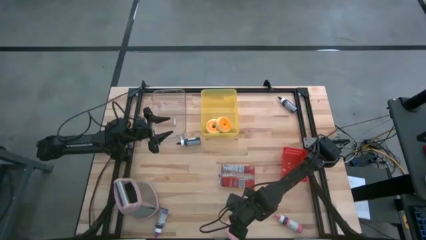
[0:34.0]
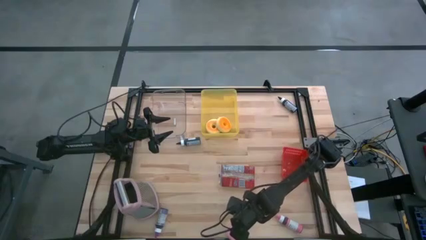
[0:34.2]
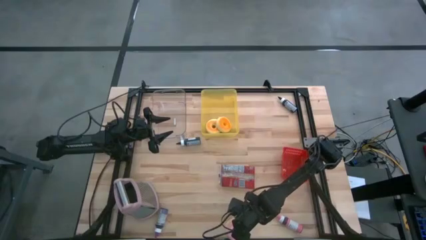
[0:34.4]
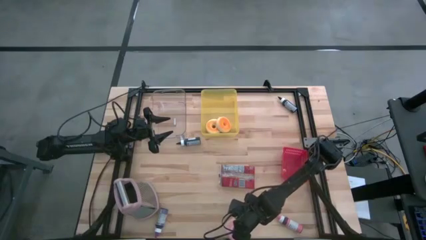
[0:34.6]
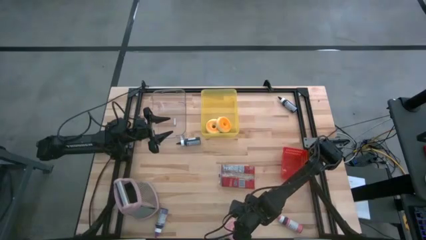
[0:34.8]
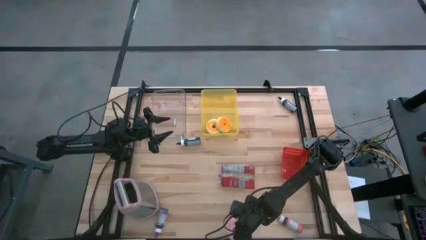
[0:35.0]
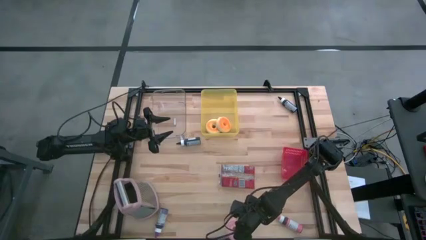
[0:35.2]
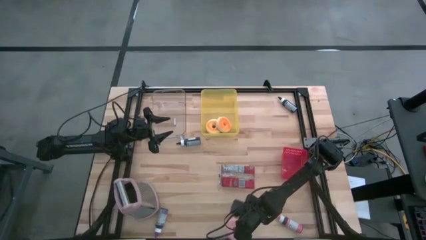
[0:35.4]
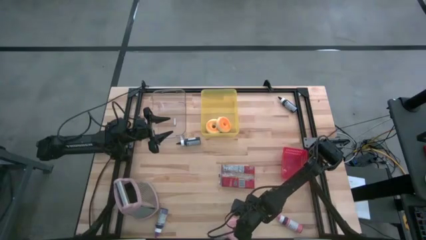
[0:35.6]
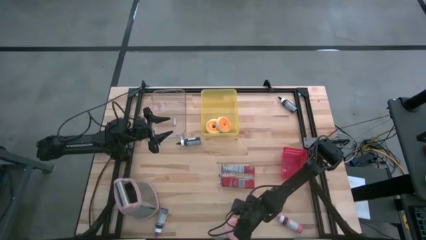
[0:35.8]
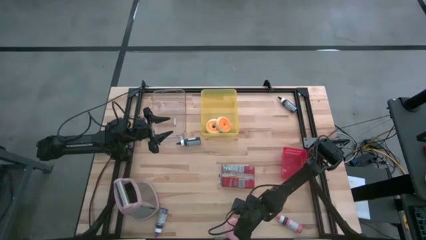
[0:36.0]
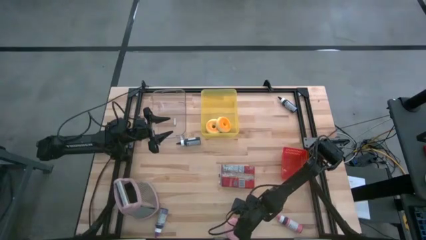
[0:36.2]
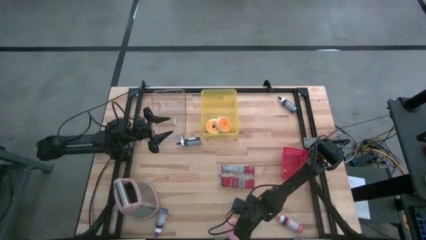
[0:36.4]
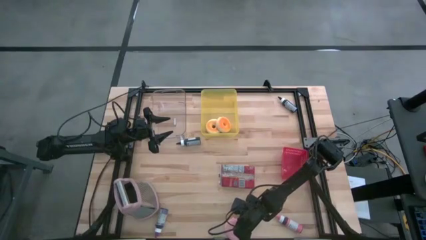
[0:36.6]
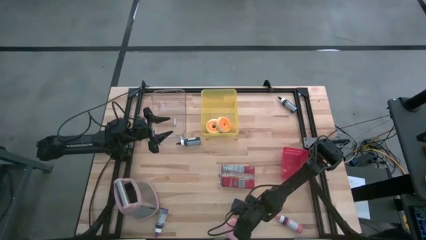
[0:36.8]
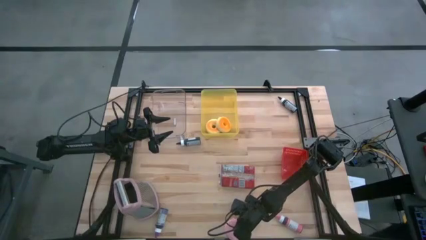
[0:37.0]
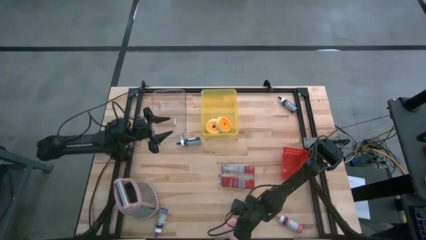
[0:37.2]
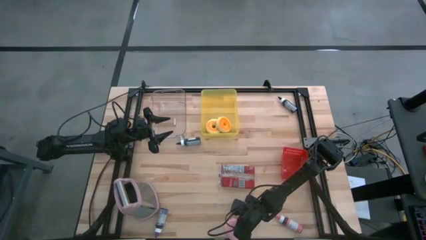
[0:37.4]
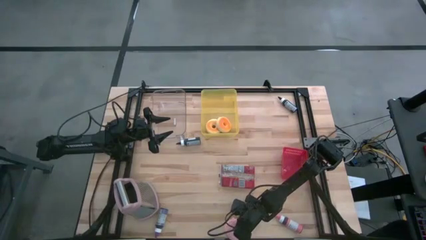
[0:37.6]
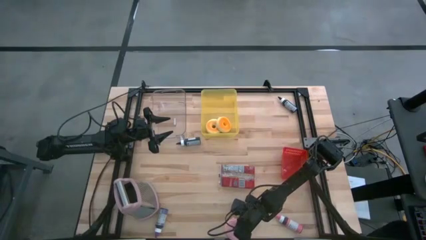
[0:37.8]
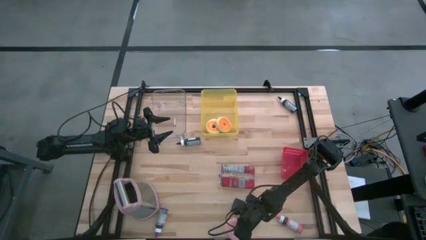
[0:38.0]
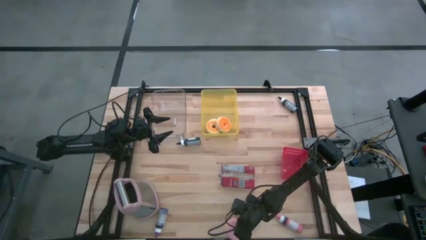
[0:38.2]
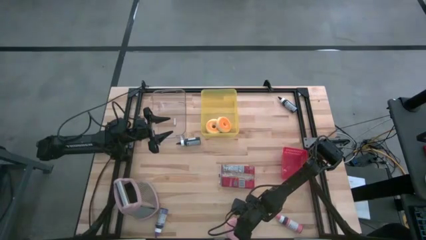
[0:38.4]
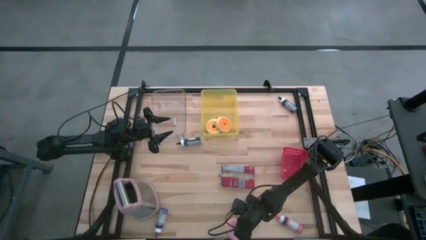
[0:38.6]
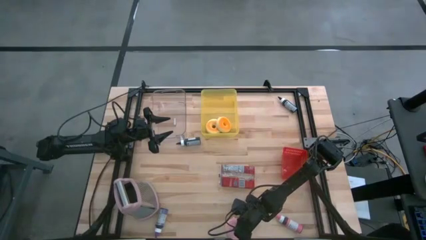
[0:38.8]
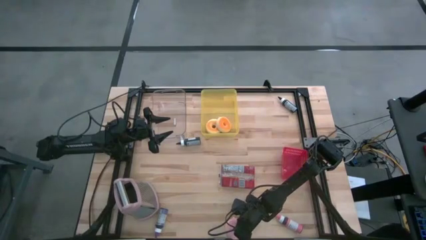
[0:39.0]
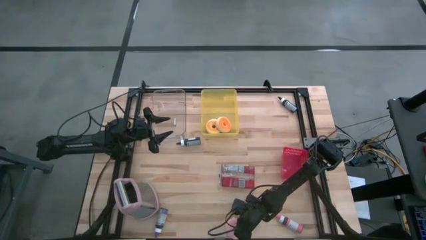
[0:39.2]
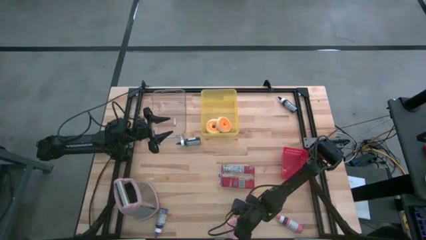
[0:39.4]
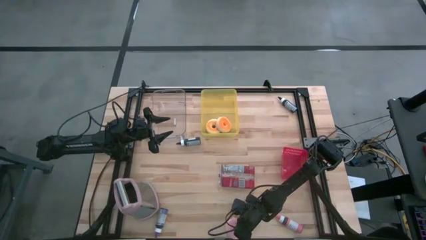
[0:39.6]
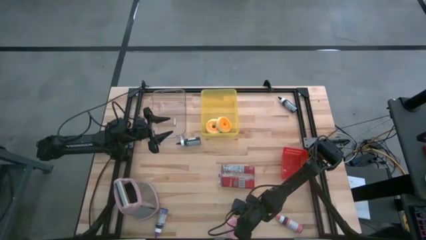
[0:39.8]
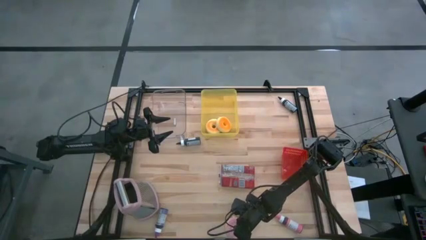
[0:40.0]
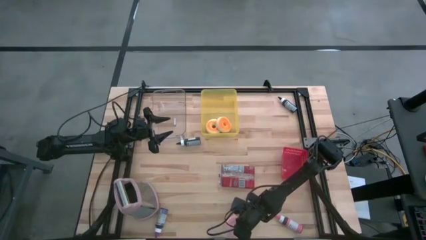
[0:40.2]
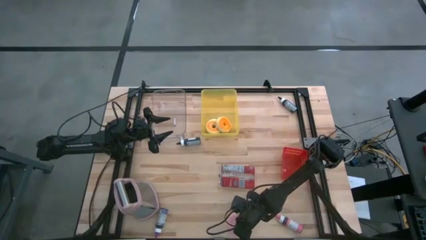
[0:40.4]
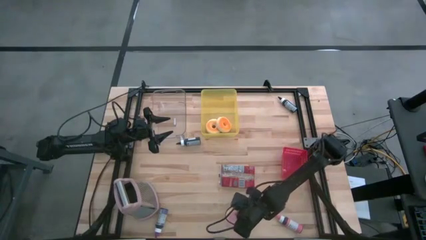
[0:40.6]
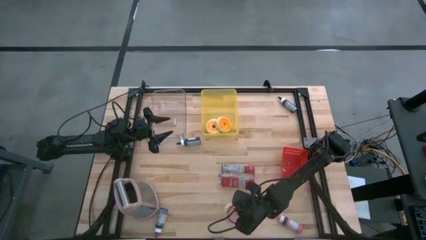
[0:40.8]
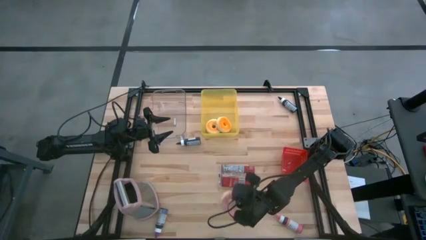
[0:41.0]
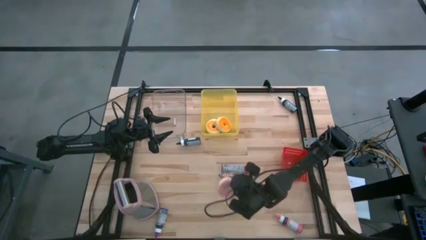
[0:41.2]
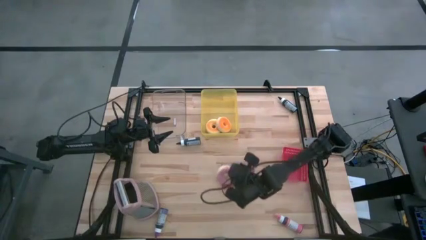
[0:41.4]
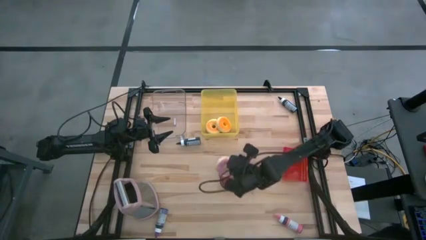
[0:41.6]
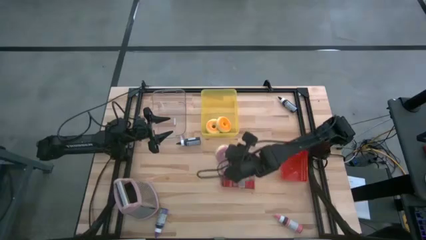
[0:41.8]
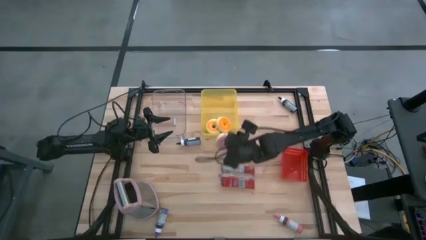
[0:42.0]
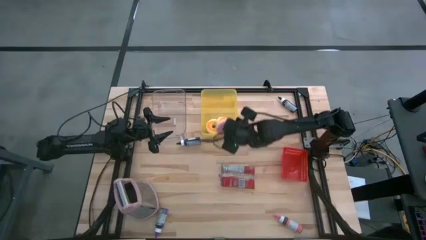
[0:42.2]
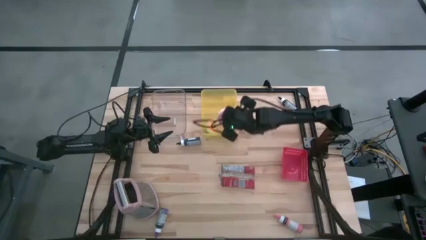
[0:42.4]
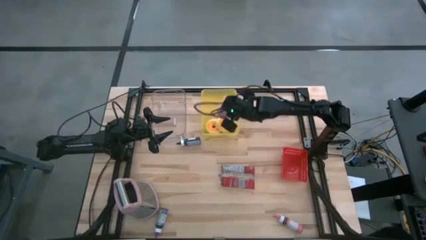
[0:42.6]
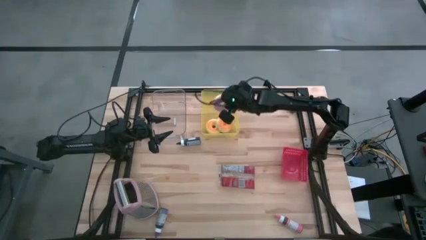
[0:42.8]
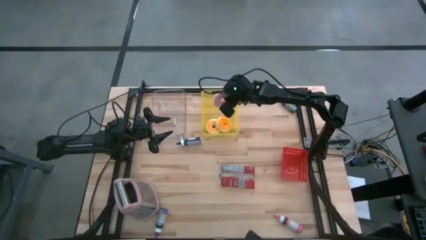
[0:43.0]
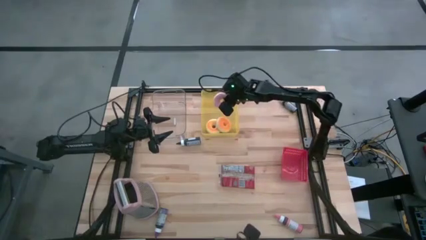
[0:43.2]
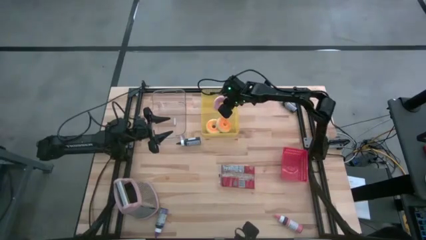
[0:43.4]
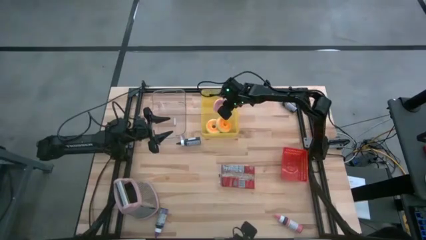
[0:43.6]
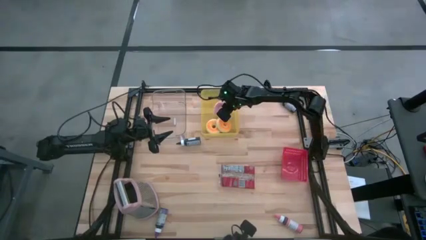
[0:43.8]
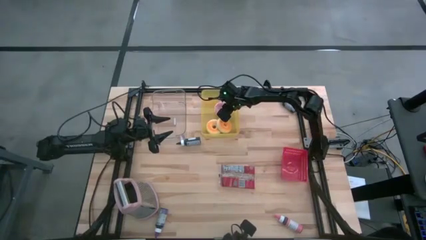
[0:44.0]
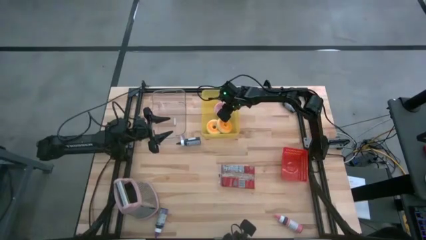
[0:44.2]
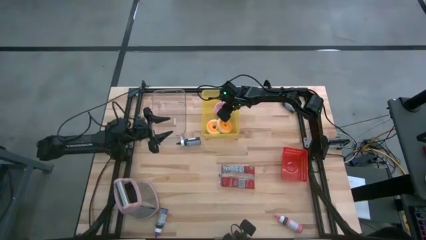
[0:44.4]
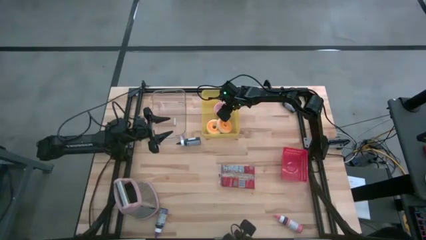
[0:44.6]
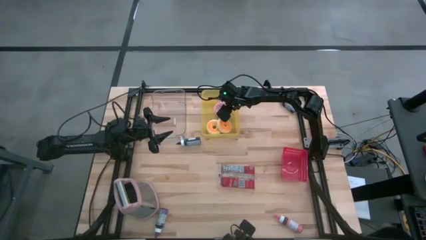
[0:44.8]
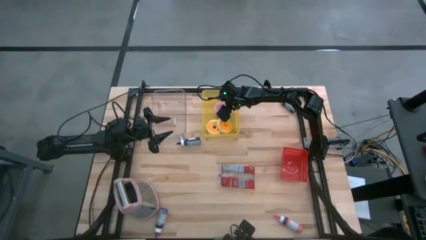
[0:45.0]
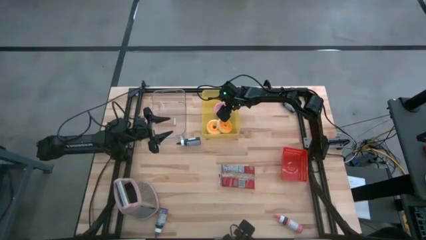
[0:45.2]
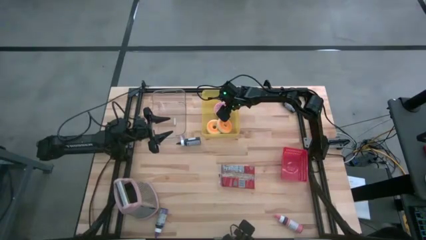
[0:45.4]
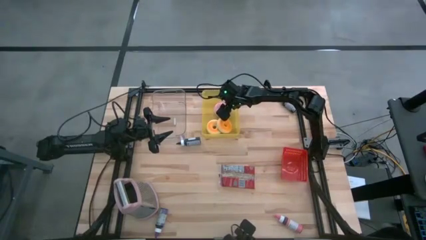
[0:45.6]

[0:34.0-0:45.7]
Task: Pick & Place Food Item
Put the pink donut into the yellow bin
